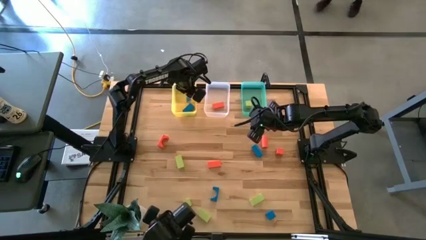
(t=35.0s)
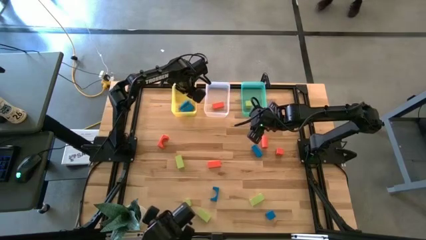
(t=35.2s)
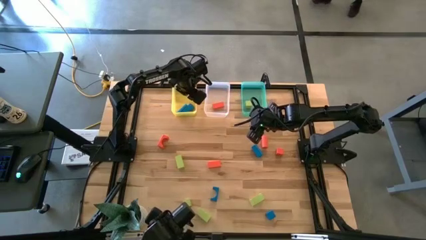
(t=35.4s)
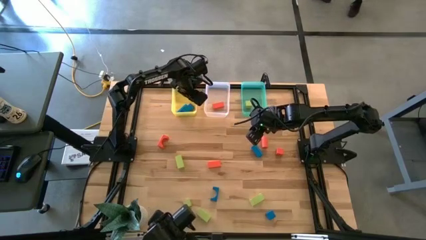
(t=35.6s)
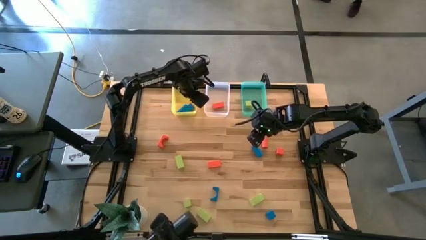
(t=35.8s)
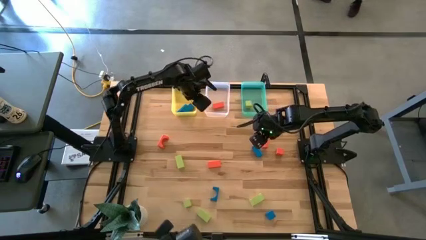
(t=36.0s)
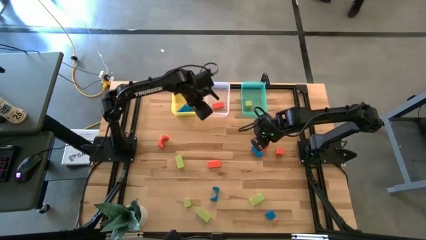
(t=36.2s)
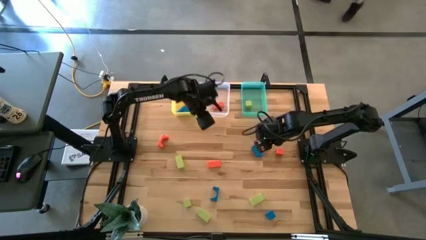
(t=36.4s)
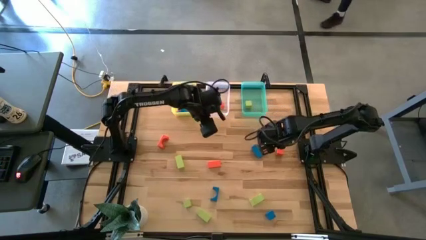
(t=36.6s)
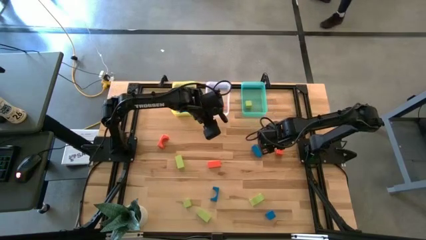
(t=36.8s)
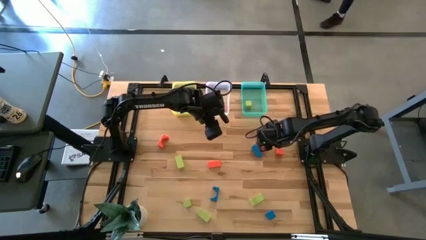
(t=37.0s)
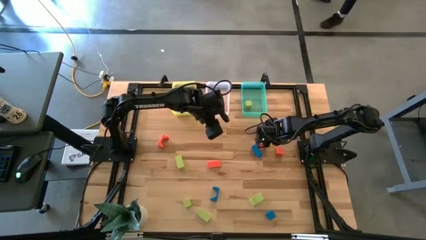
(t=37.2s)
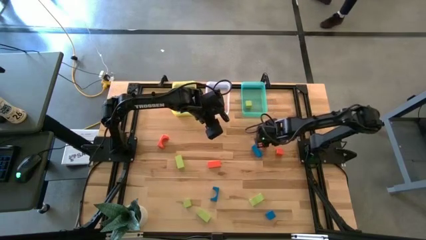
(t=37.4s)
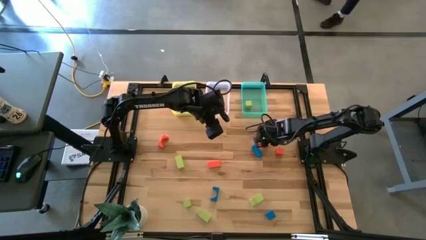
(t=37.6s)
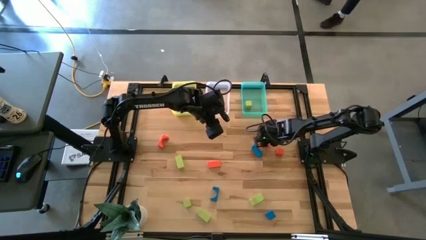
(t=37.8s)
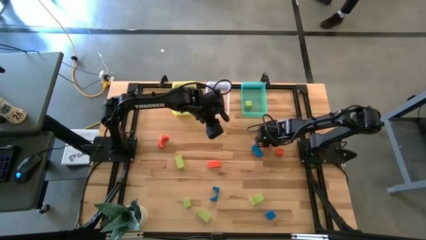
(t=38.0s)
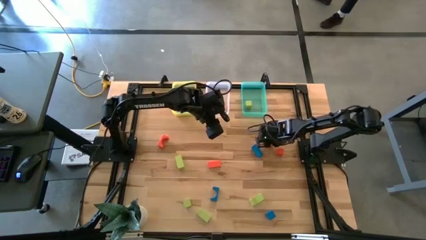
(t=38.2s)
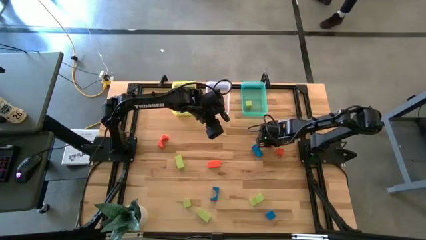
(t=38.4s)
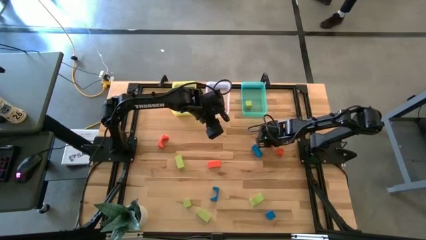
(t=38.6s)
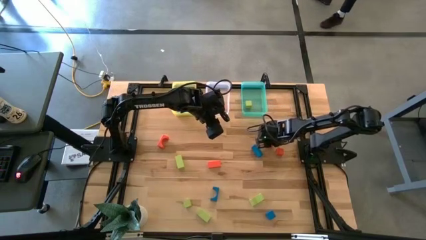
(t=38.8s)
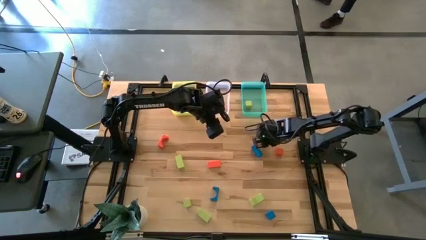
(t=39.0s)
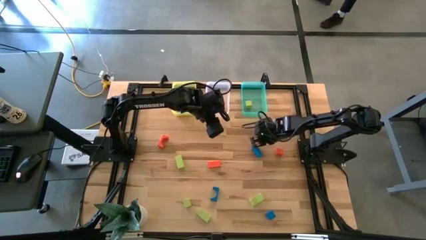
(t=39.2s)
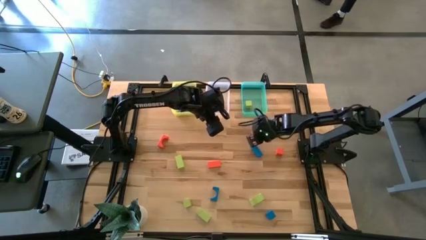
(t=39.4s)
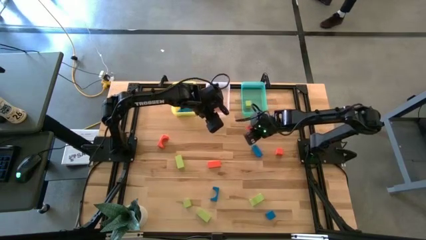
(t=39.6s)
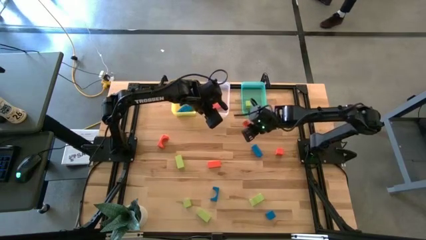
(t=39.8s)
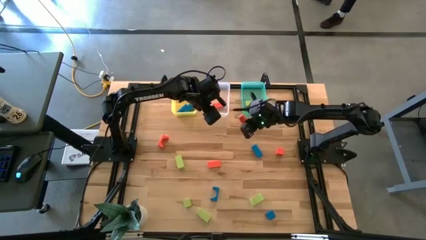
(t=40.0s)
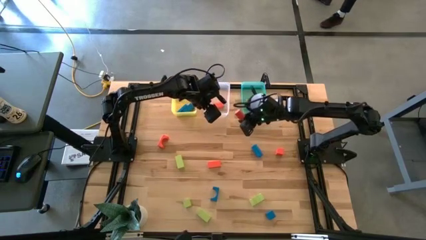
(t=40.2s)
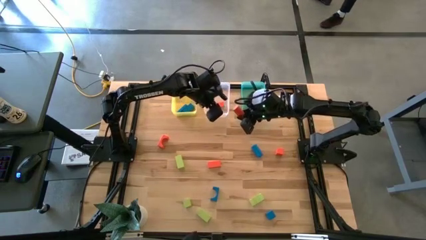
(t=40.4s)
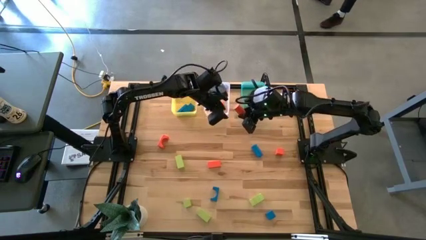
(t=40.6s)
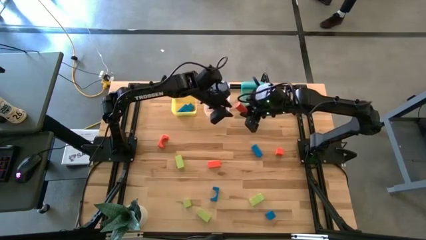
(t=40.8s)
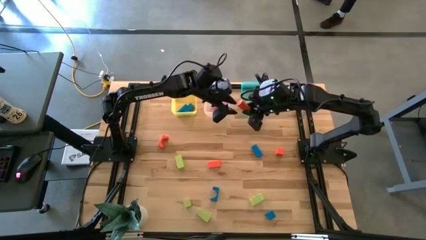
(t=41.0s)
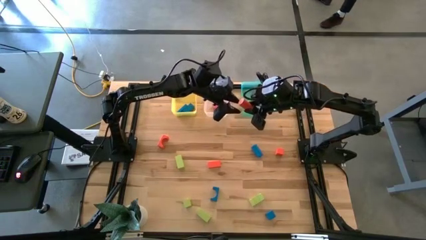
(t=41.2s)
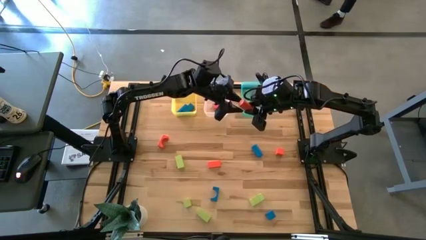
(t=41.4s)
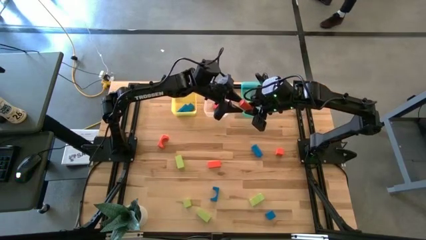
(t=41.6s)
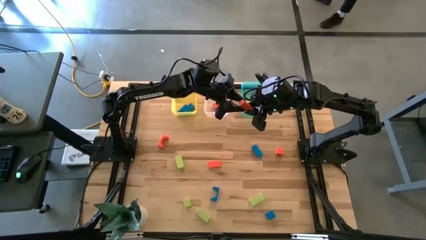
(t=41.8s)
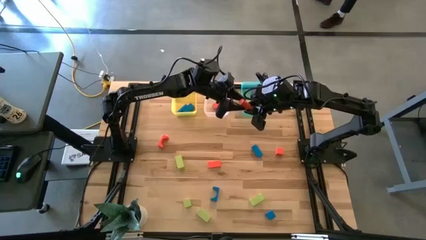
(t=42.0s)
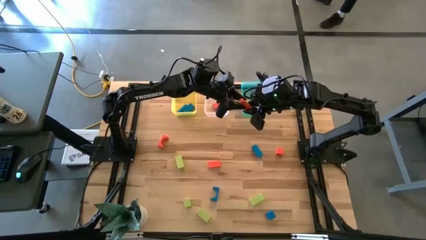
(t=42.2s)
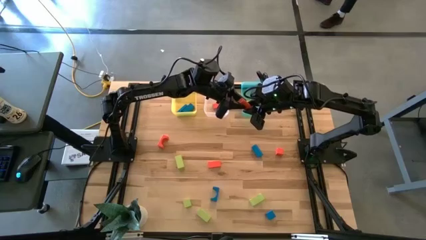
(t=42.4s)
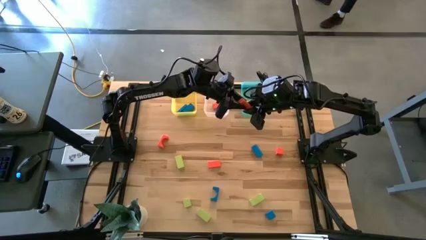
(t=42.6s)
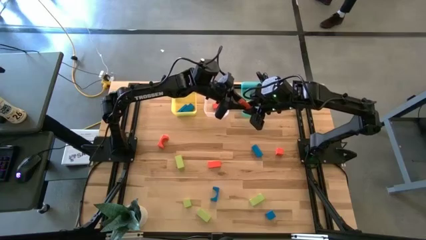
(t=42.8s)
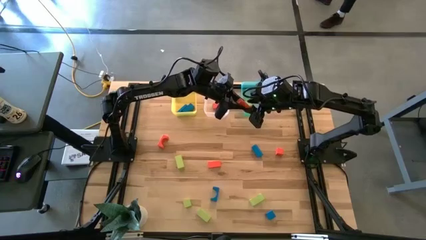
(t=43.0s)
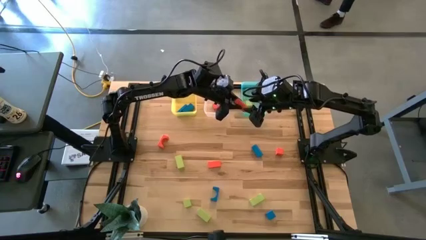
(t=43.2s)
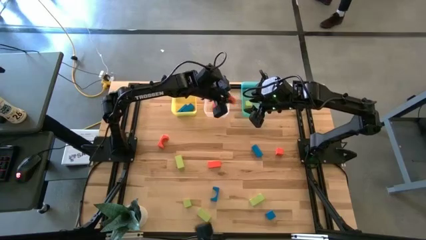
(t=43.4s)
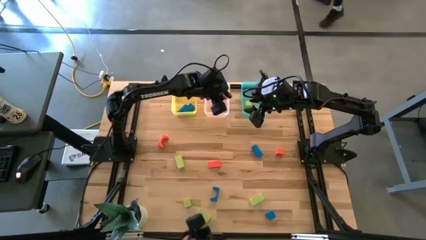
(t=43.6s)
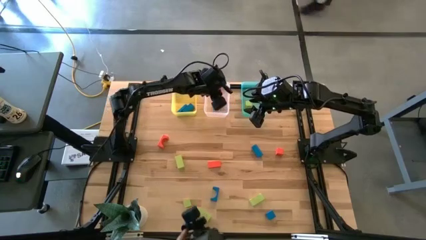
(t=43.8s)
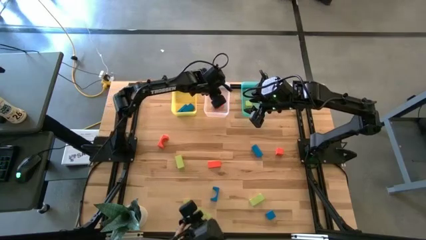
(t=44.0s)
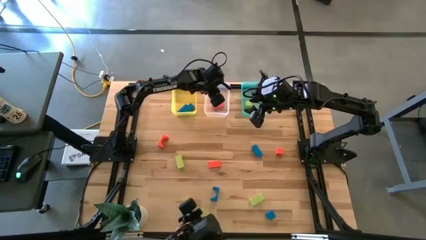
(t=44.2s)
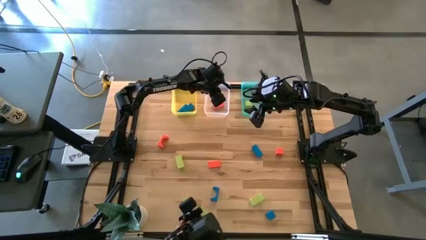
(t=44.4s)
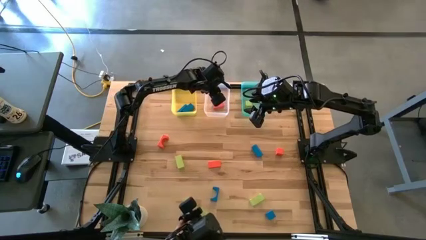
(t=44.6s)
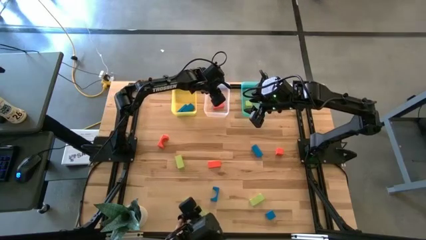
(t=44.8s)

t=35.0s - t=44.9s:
Task: Sort & place blocks by color
Put the orange block into the transparent bin

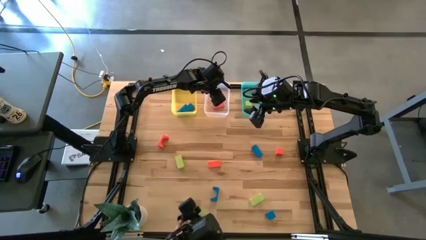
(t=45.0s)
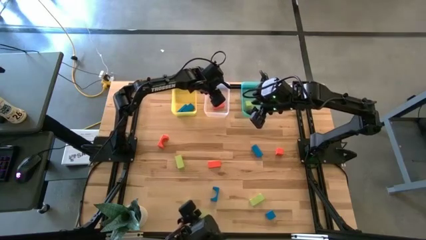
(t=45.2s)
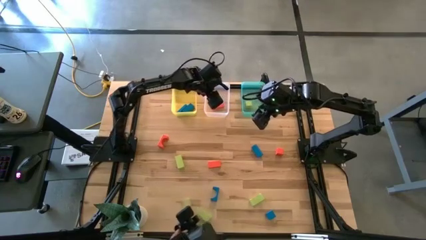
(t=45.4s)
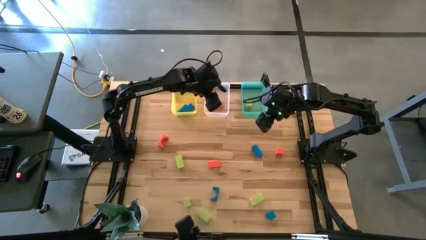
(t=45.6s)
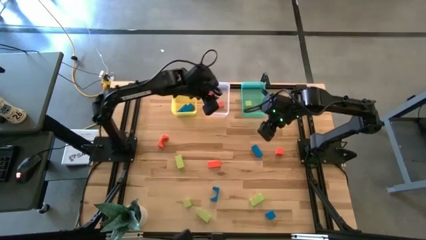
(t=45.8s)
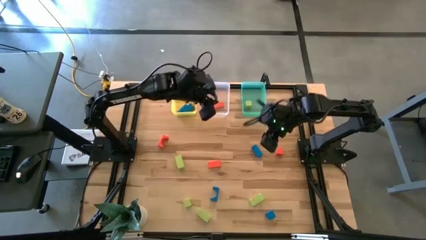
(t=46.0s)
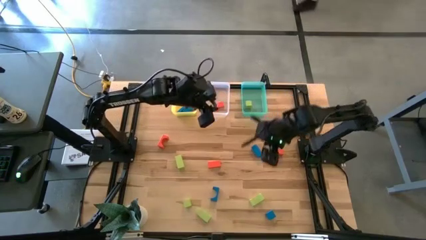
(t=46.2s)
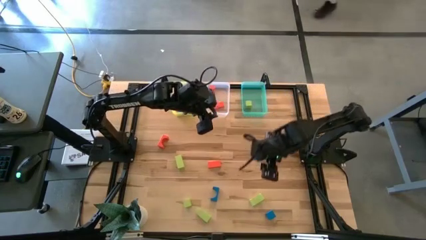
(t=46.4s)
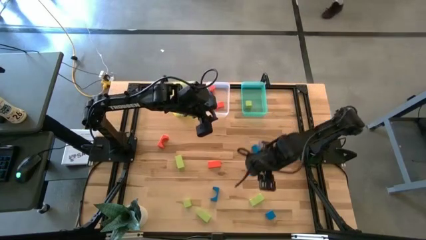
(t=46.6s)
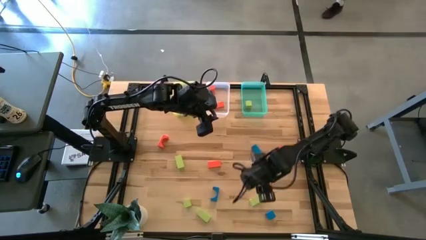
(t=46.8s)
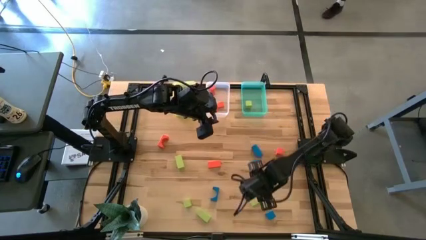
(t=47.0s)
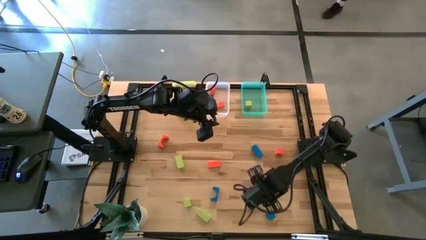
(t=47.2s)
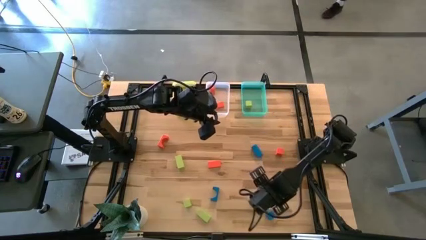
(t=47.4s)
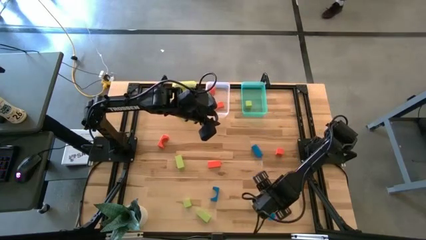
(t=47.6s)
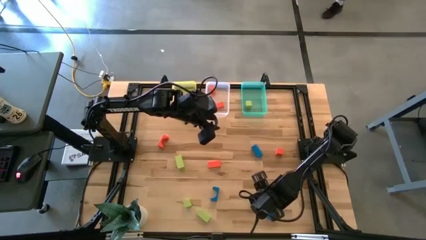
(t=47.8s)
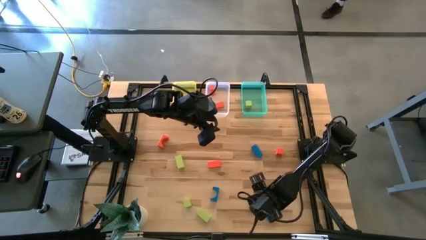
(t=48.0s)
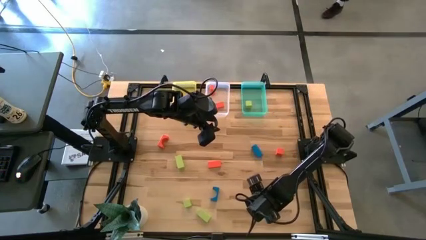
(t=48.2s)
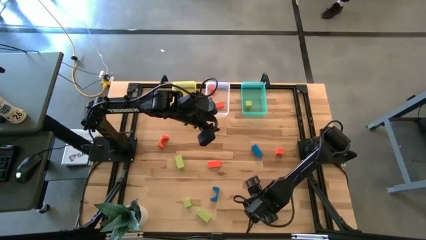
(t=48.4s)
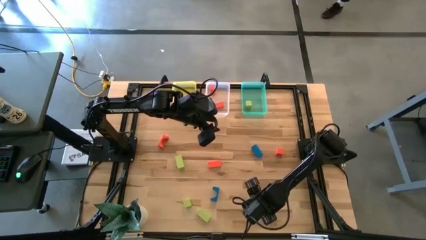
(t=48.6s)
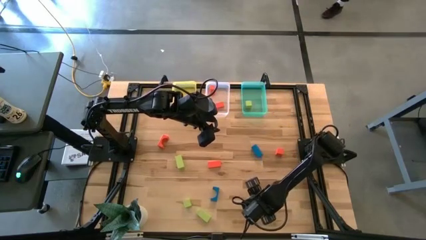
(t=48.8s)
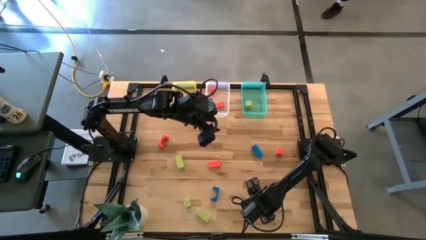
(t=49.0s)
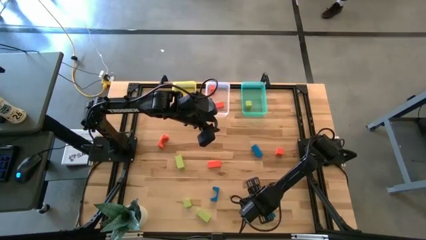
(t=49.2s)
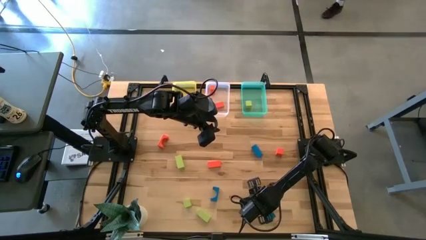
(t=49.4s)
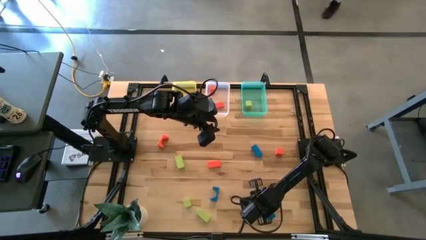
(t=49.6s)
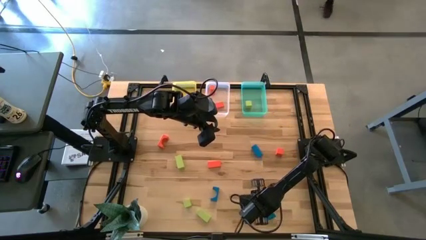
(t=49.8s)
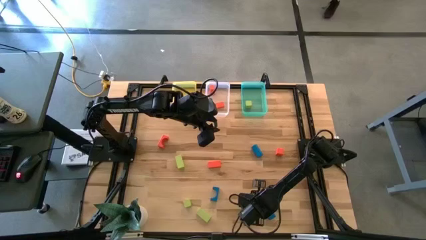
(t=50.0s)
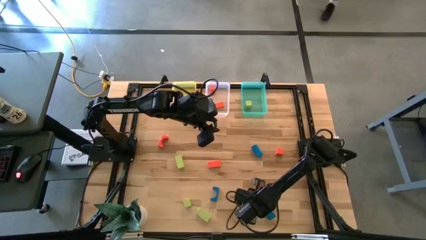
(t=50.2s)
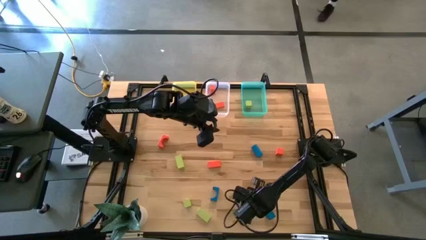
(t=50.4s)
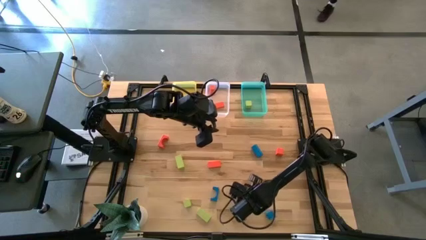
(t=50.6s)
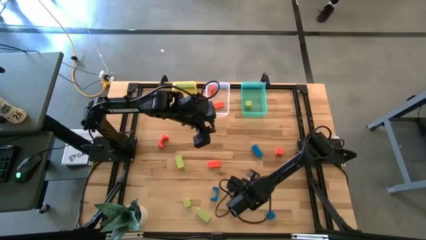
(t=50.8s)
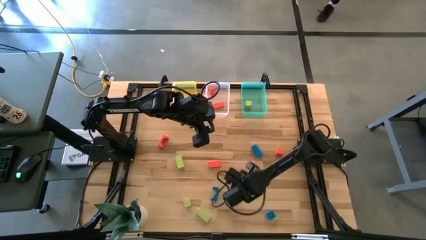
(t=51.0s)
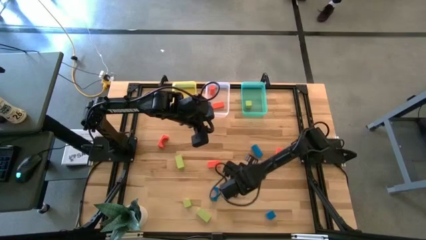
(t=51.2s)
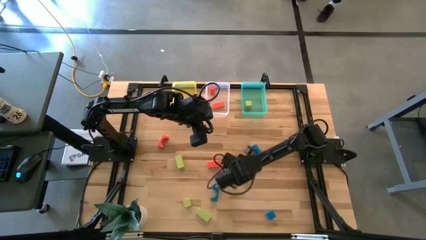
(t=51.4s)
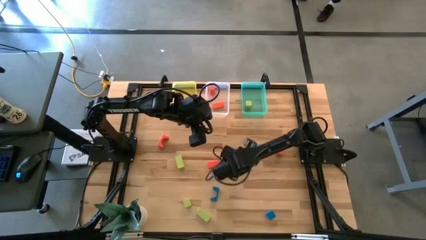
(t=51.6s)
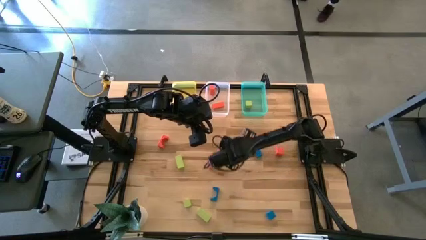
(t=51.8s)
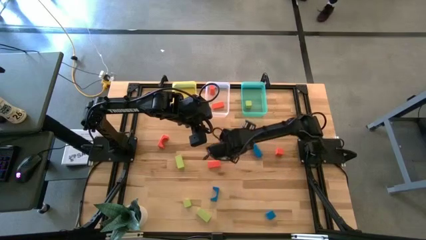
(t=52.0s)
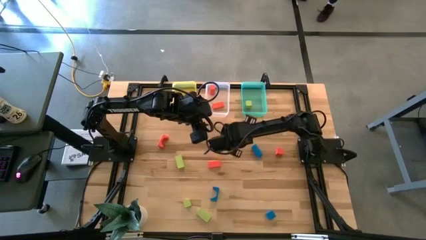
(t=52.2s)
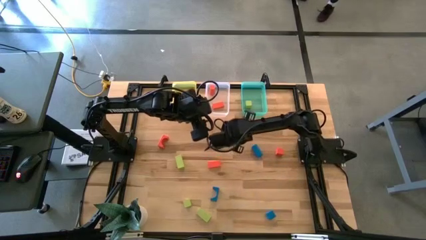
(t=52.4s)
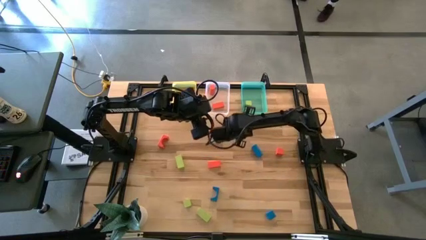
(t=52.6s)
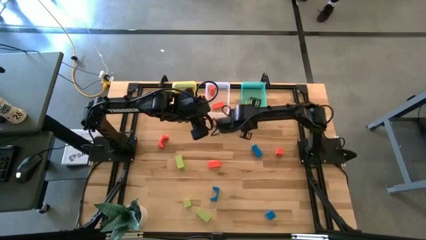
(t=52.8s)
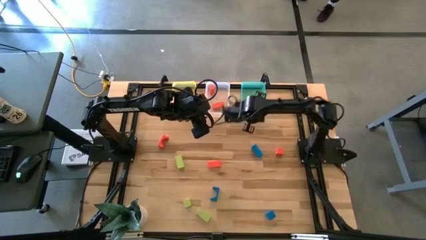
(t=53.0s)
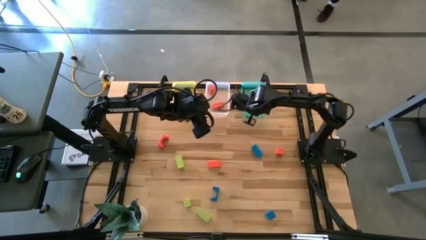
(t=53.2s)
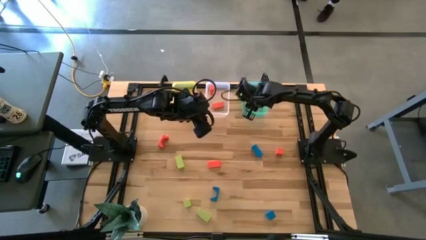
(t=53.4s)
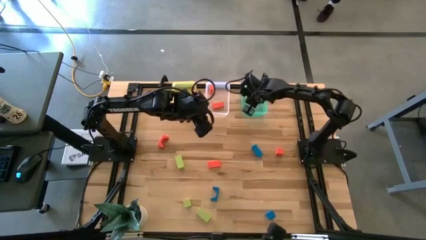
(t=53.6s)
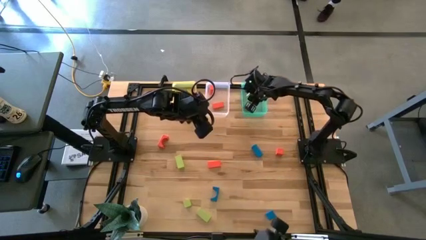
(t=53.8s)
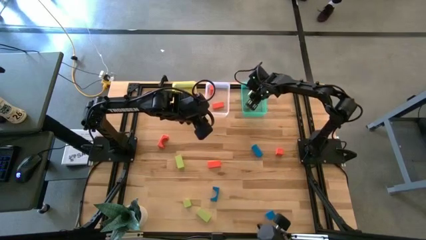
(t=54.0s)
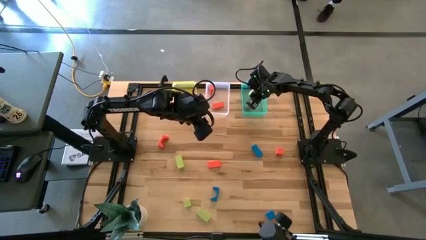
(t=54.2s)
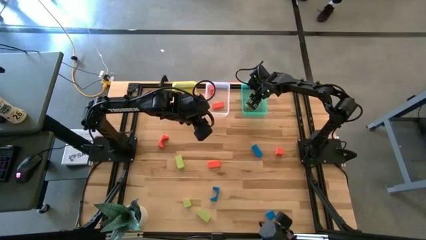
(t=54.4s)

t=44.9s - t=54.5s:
Put the green block into the blue bin
